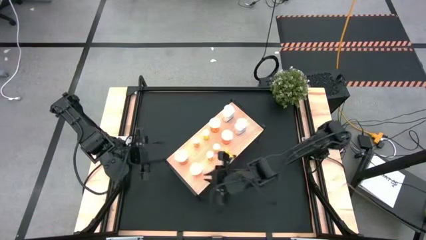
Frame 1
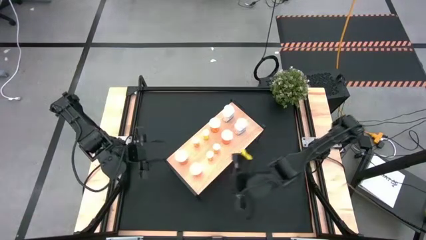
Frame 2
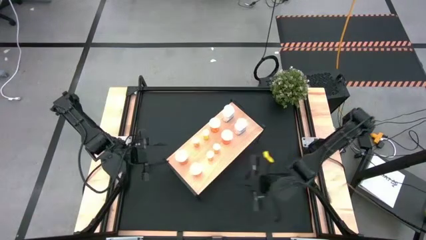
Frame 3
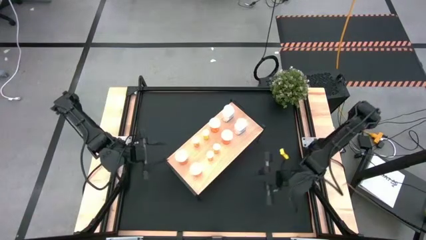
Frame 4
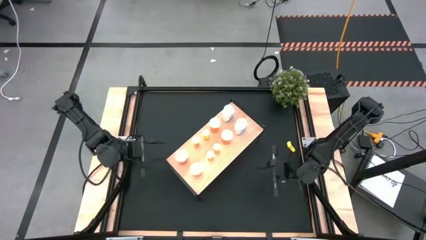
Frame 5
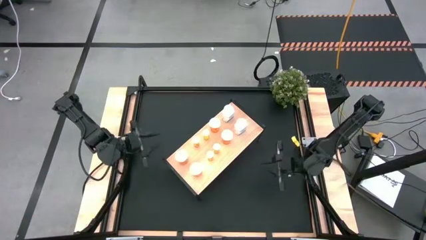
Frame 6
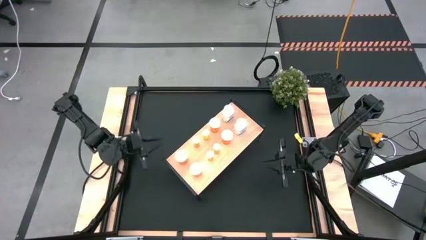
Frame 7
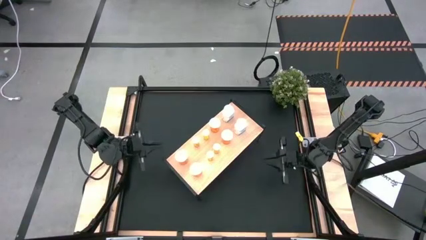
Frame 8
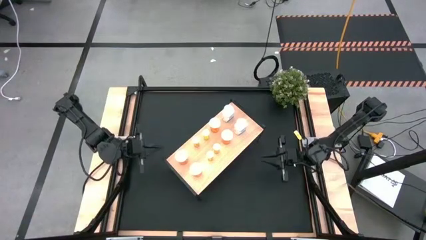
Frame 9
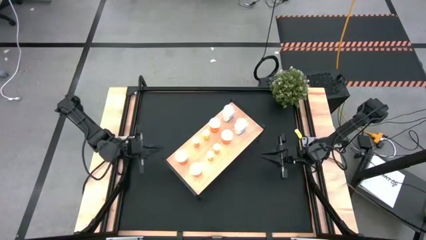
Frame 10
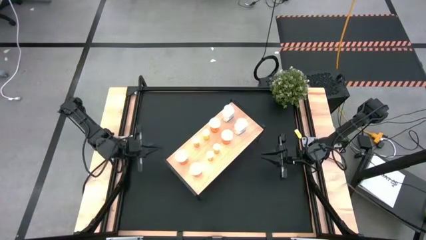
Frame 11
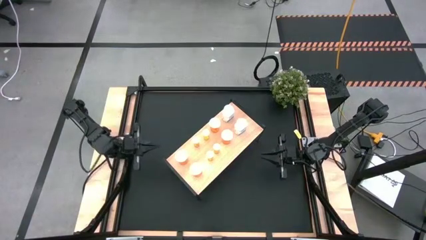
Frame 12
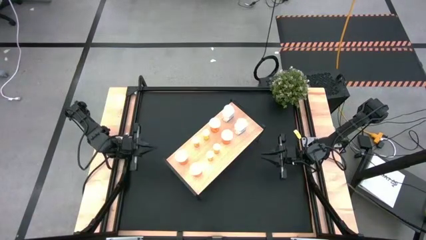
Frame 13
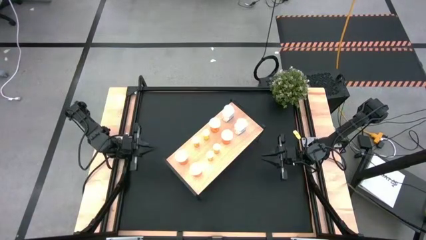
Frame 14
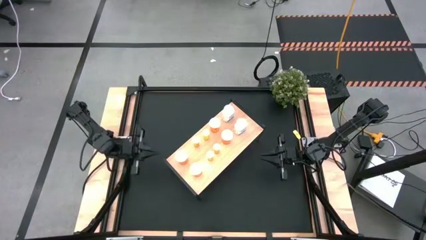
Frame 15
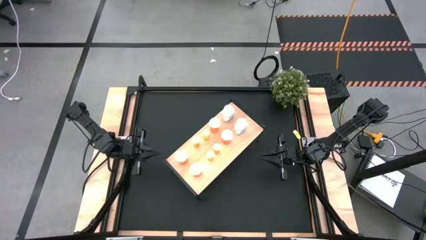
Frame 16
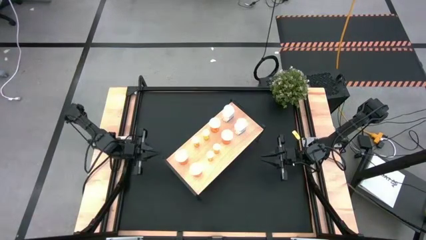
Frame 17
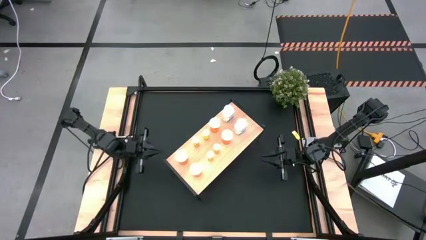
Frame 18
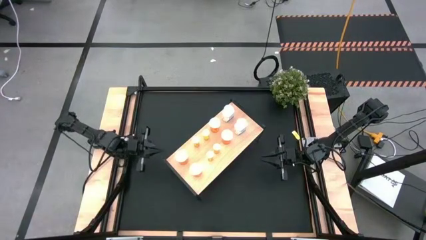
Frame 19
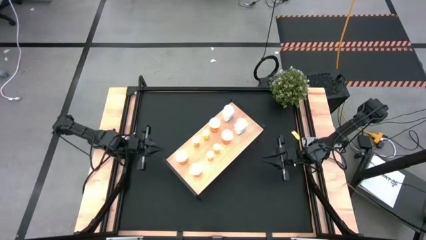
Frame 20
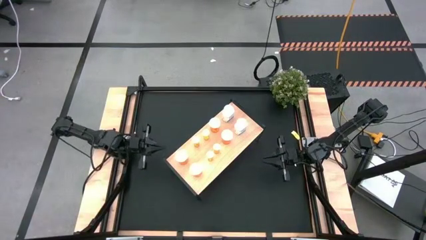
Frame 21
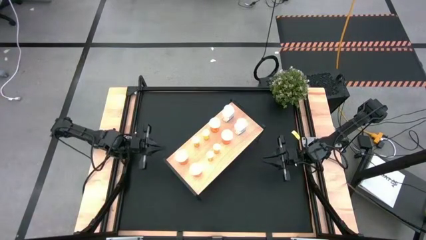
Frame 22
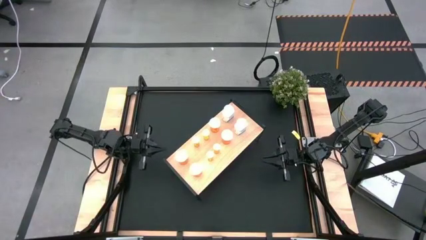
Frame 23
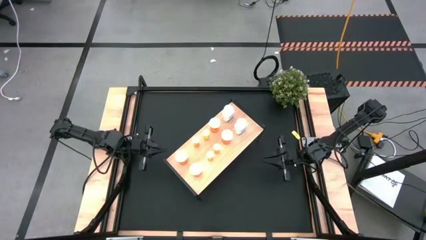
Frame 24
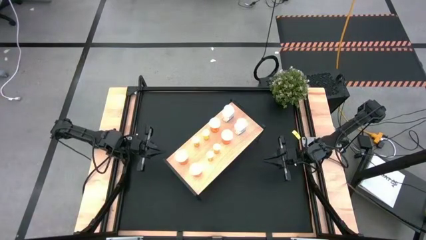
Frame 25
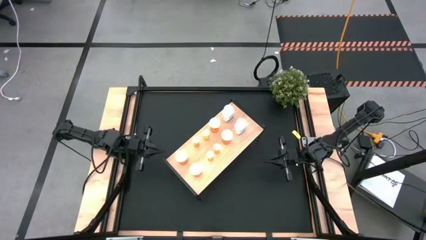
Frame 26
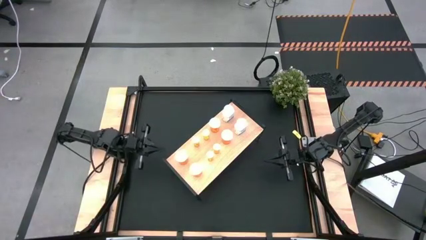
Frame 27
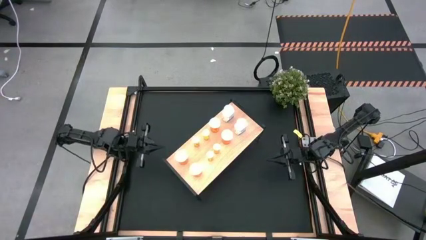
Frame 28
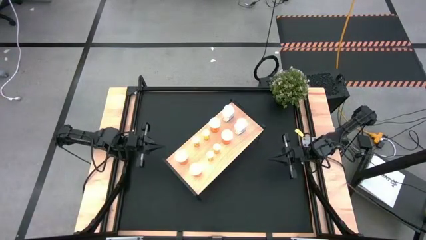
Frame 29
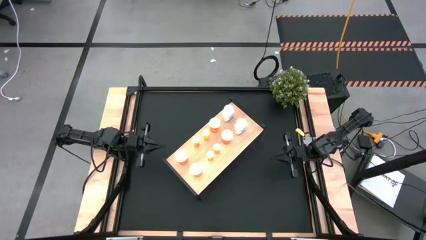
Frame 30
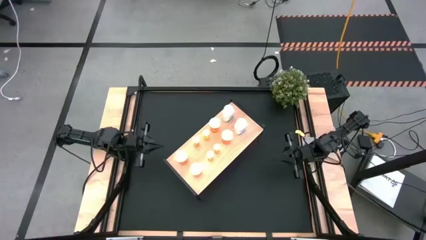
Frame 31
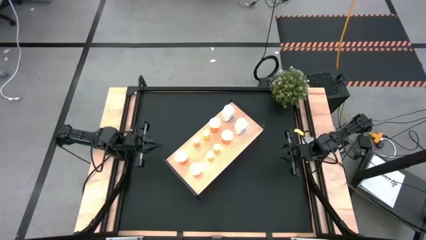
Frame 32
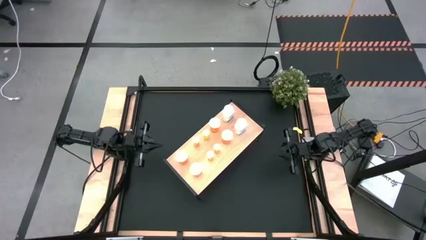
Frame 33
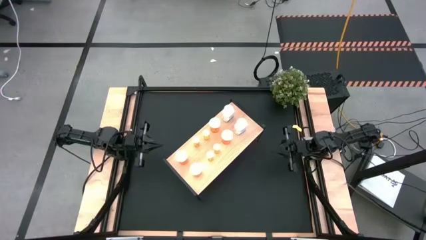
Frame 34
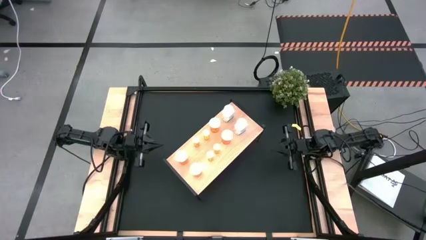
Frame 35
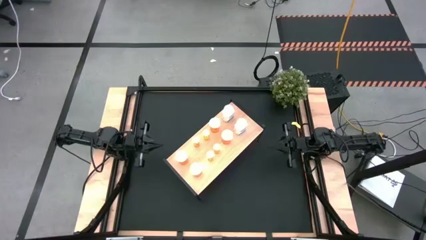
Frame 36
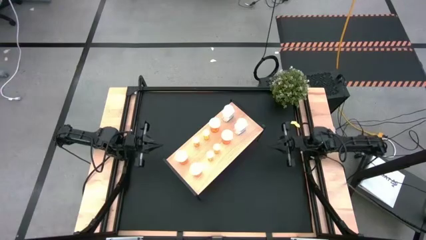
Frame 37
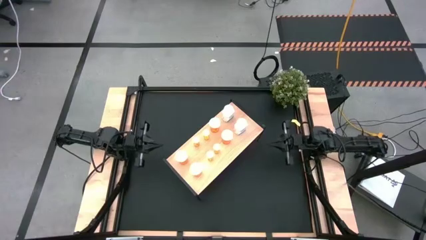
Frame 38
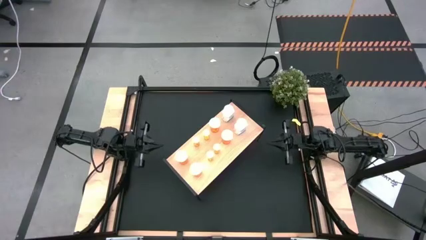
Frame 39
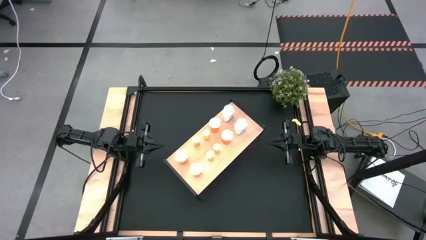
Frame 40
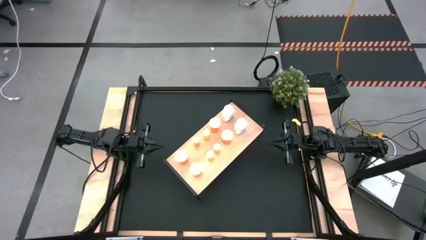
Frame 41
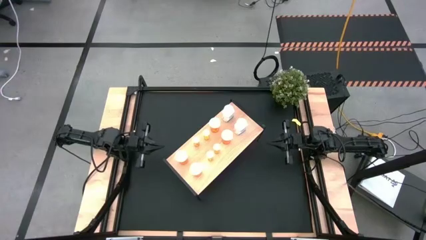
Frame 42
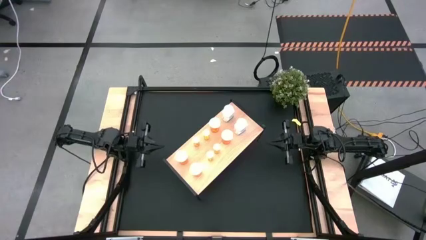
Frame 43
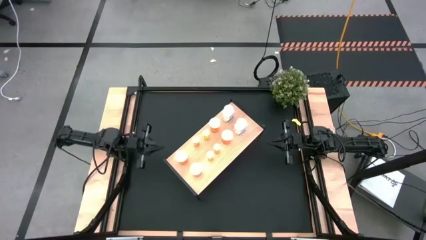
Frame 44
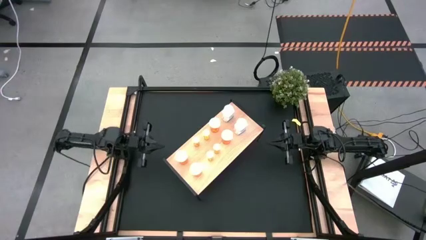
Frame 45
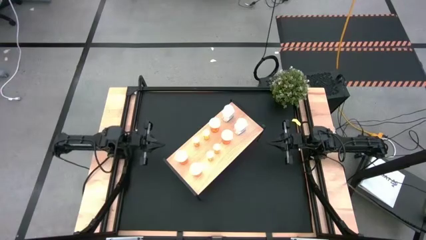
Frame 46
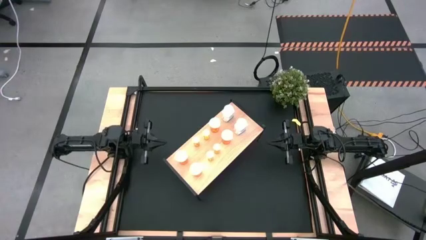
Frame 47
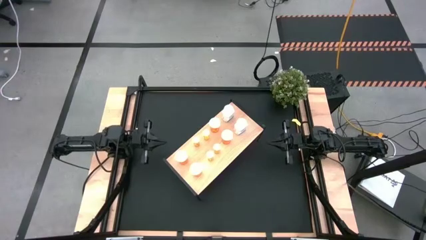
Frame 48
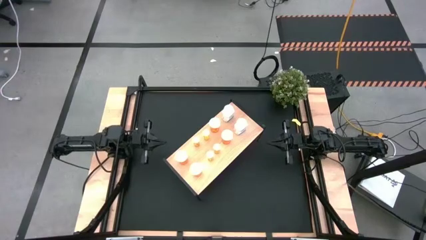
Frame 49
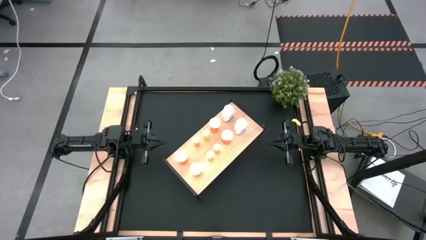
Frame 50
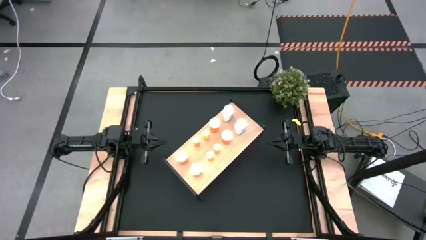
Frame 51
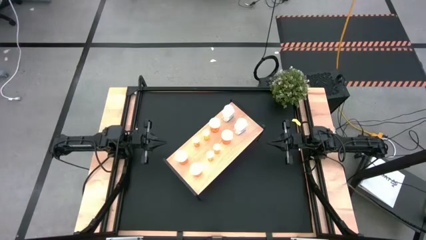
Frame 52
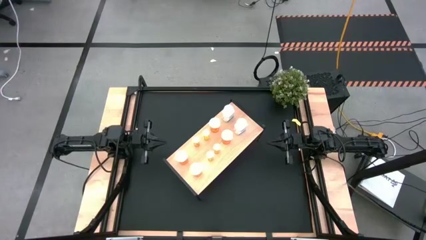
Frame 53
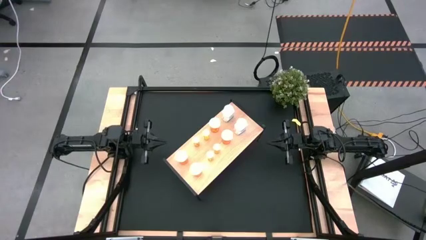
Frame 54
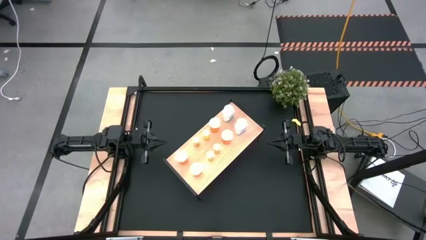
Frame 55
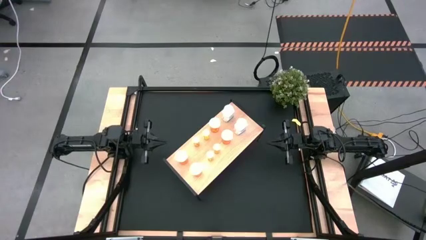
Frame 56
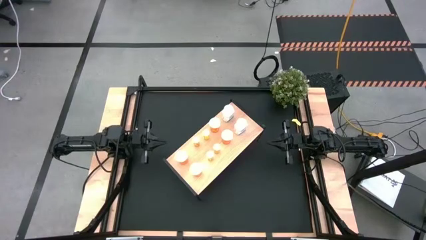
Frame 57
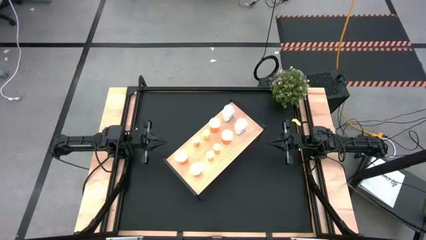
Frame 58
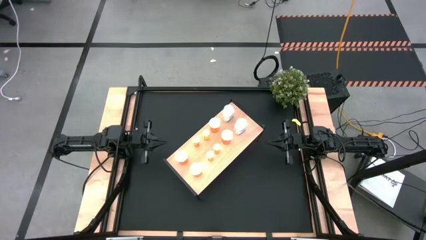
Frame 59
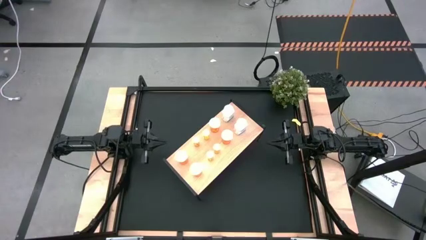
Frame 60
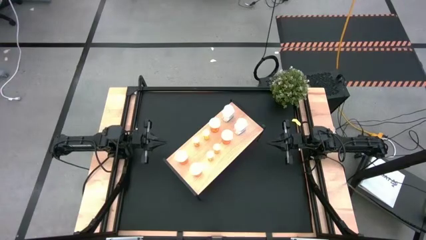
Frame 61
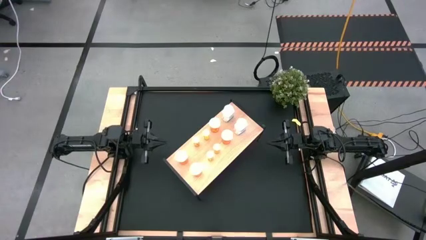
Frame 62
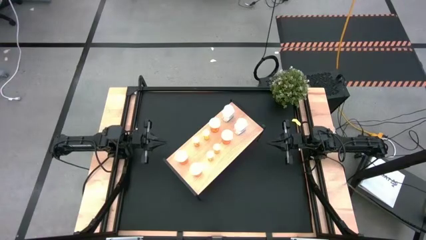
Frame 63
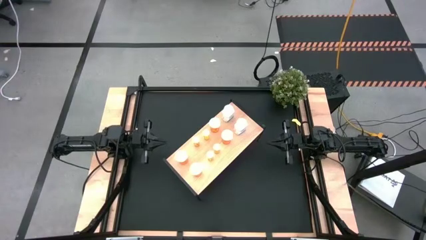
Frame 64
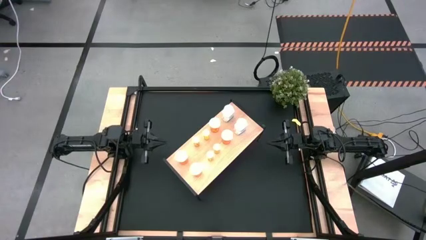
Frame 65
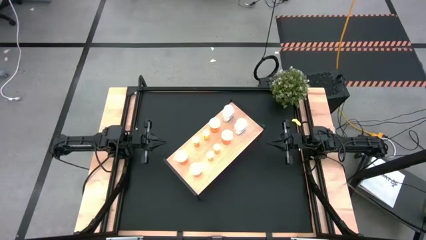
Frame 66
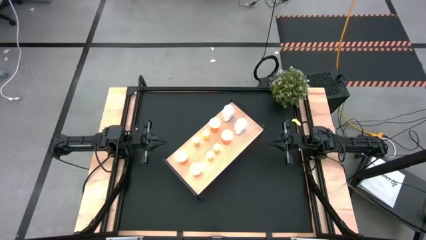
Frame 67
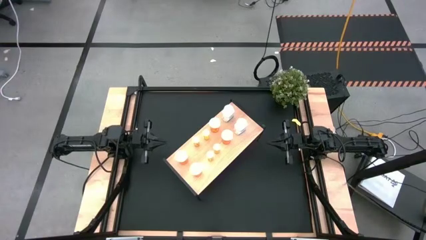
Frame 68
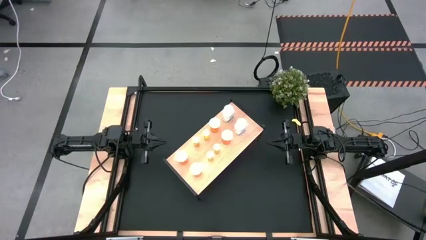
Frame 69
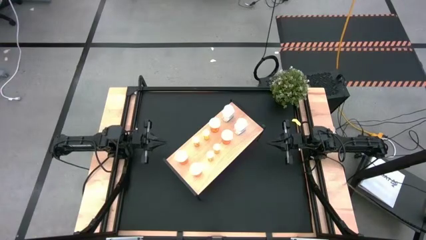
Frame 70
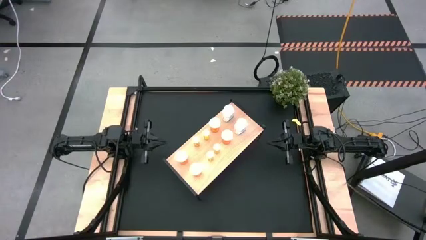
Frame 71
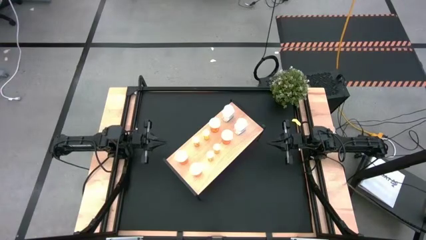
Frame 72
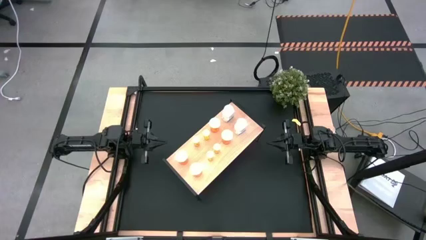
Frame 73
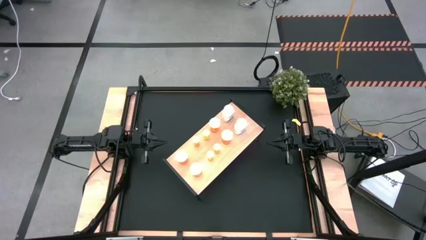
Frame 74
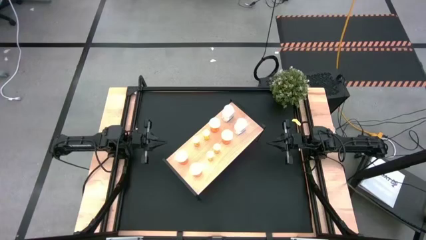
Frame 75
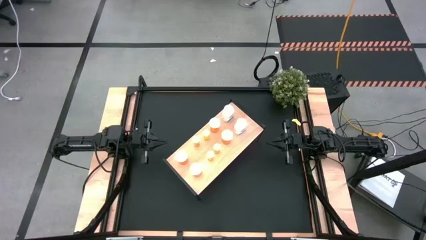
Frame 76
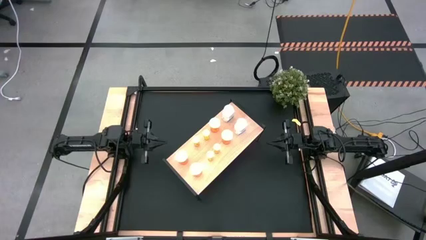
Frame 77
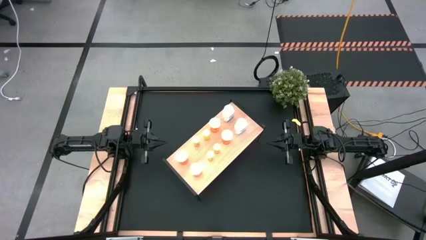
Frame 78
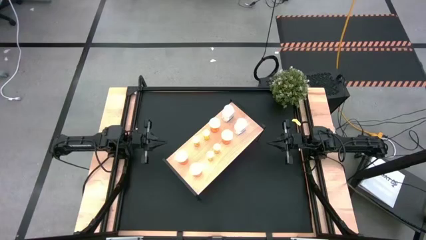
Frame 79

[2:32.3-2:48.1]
Task: Pick and place medicine bottles onto shelf by color
Return to Home Position
